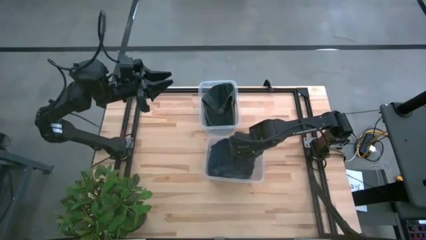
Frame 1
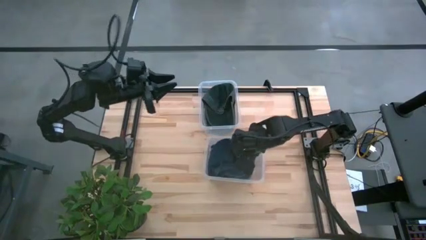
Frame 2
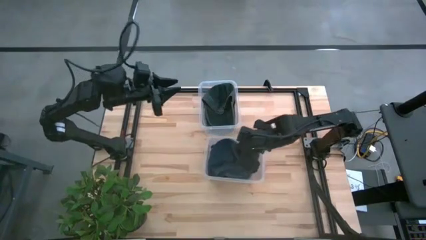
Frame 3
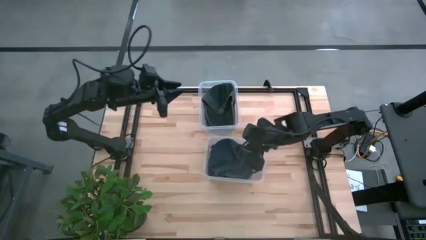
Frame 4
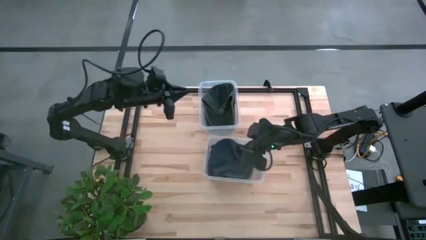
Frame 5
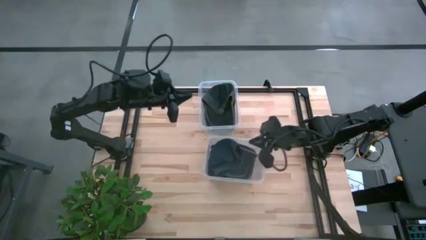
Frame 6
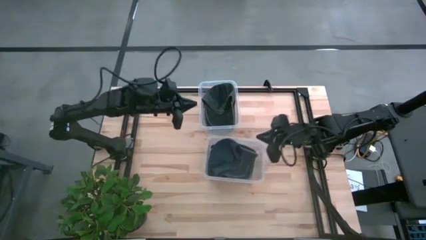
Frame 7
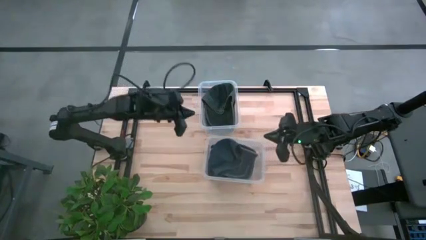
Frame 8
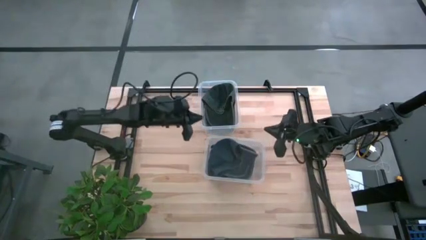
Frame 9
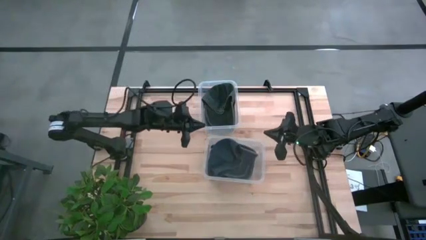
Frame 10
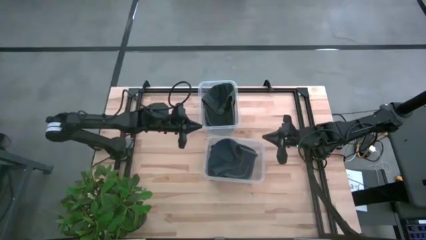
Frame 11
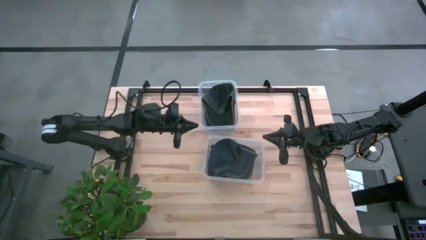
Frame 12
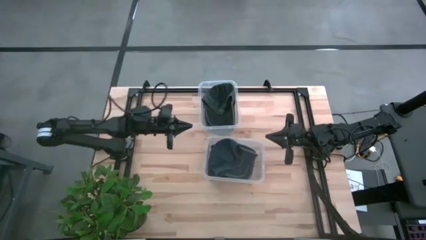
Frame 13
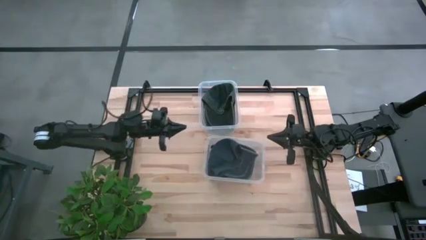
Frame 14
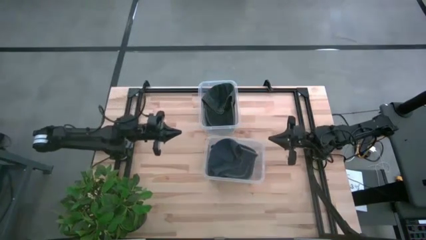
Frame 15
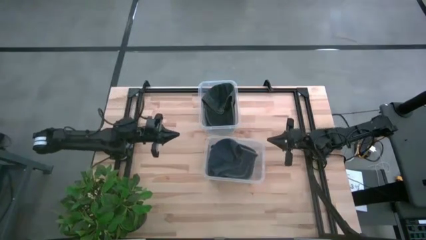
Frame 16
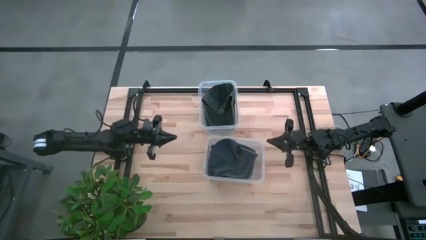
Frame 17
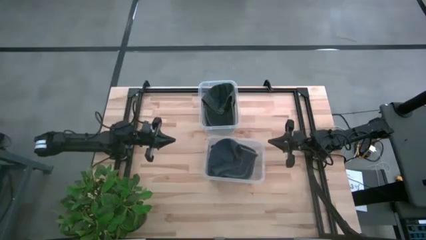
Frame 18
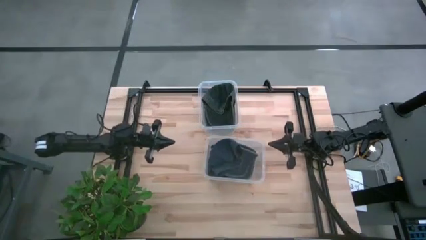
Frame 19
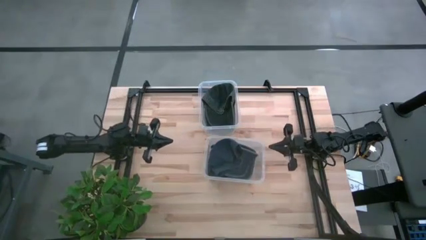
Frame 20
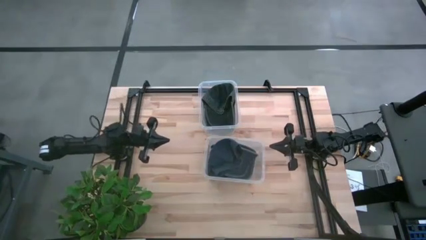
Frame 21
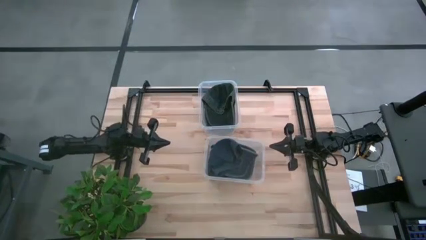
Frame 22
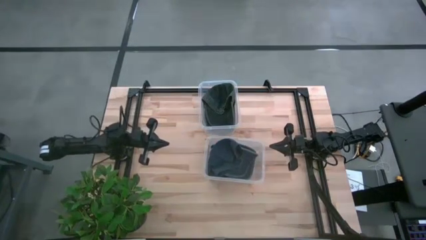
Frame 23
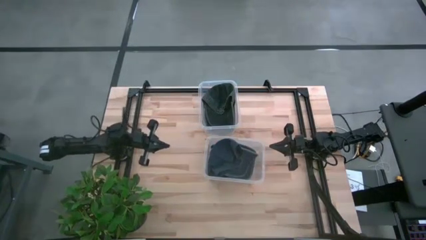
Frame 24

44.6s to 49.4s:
Task: Pick & Place hat
Return to Home Position

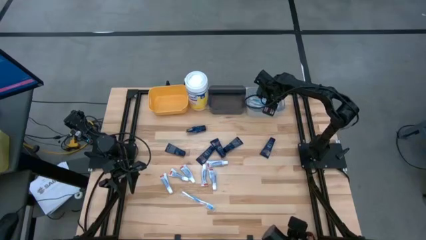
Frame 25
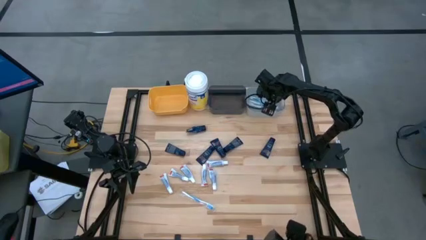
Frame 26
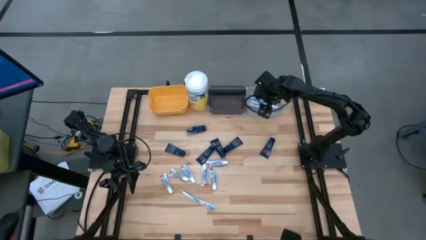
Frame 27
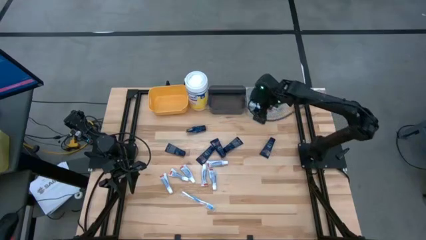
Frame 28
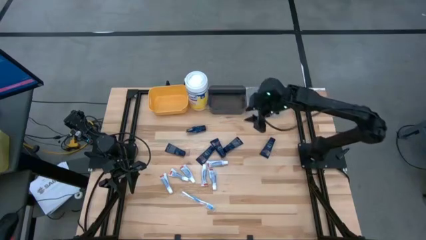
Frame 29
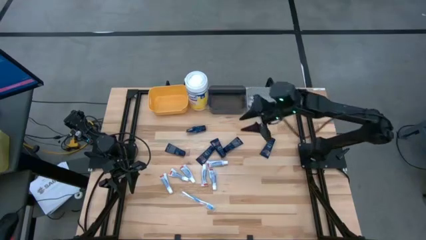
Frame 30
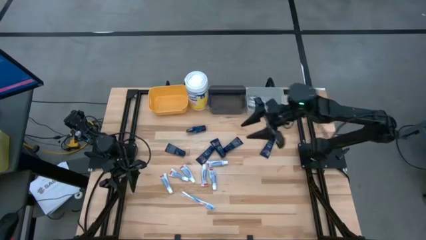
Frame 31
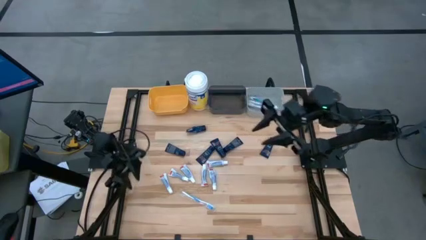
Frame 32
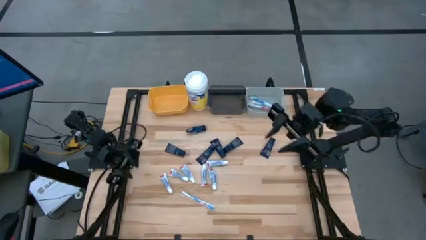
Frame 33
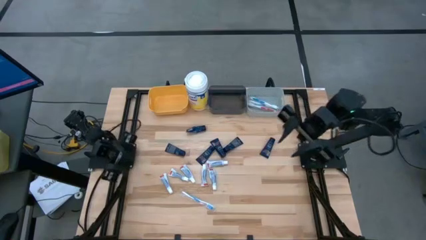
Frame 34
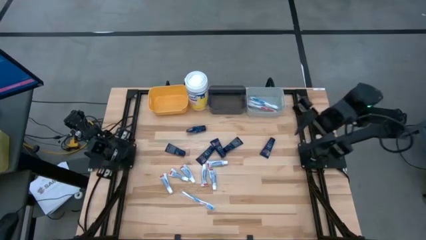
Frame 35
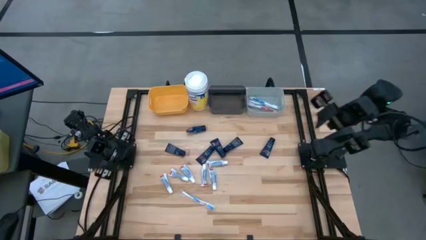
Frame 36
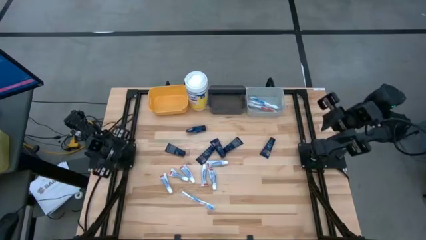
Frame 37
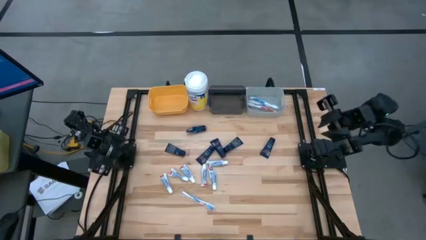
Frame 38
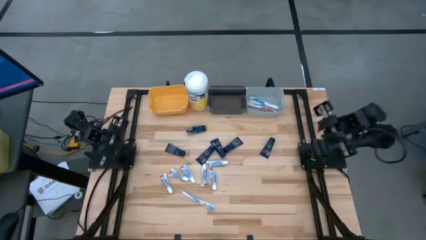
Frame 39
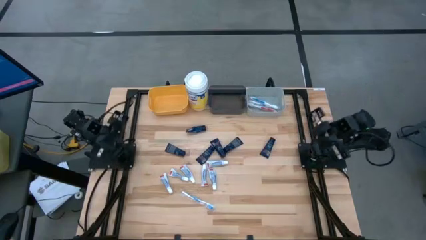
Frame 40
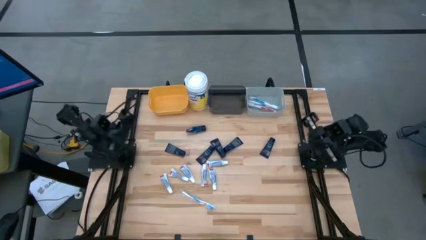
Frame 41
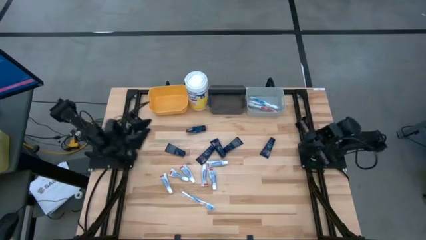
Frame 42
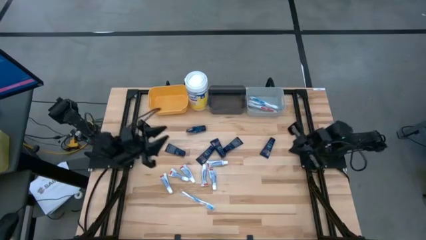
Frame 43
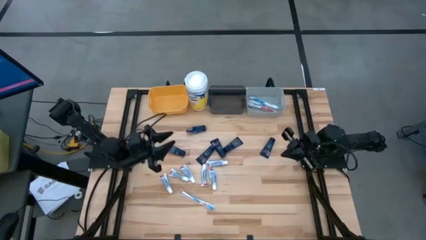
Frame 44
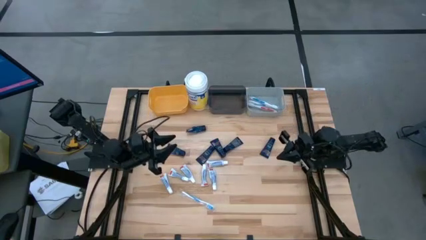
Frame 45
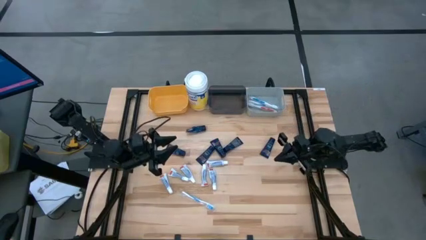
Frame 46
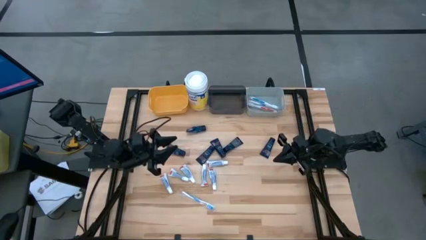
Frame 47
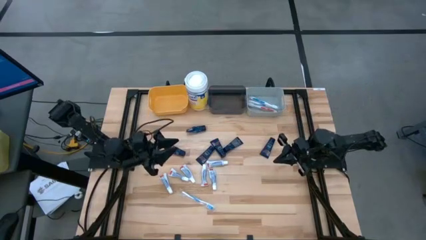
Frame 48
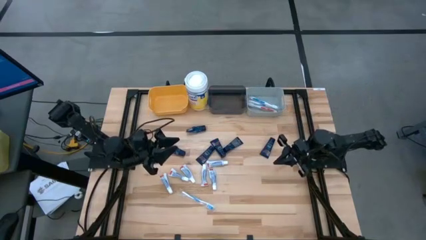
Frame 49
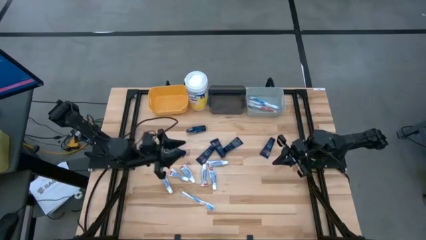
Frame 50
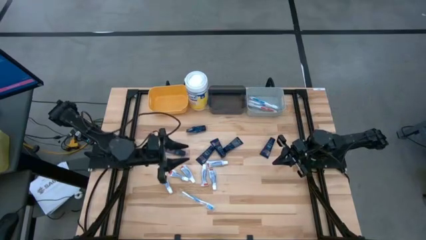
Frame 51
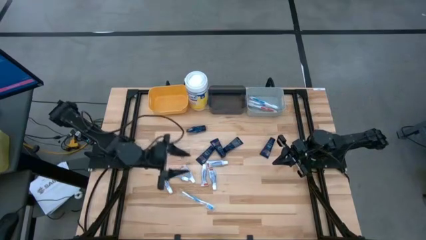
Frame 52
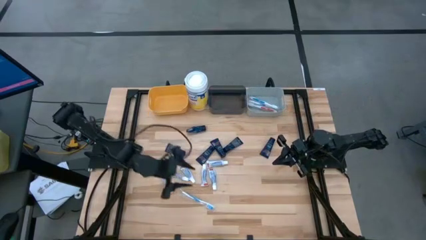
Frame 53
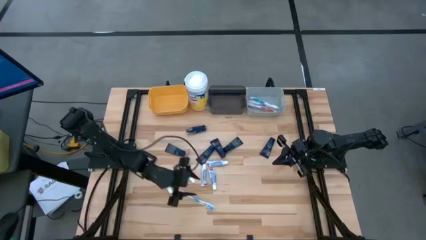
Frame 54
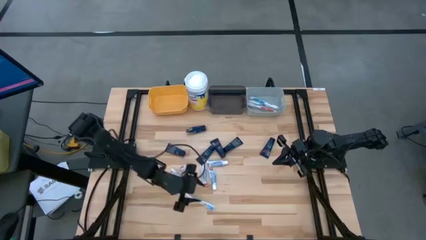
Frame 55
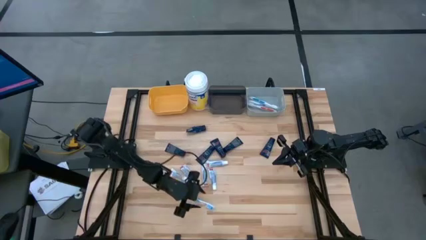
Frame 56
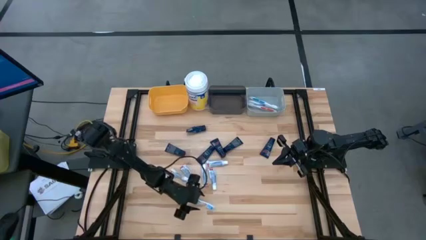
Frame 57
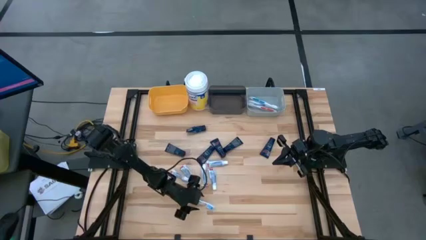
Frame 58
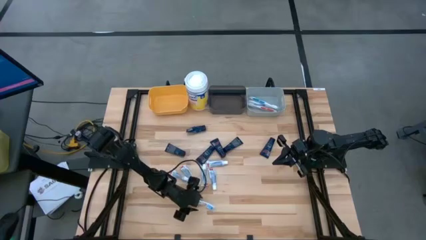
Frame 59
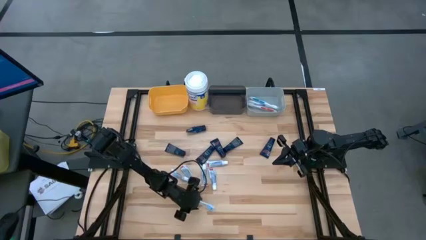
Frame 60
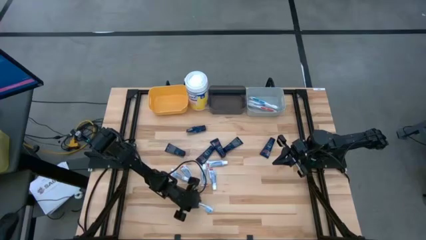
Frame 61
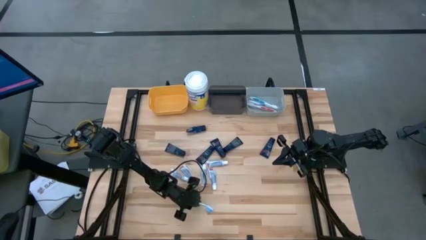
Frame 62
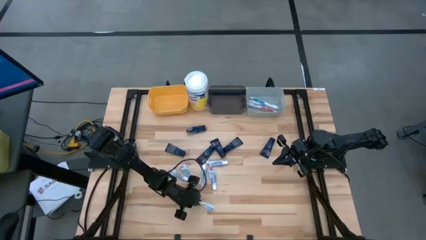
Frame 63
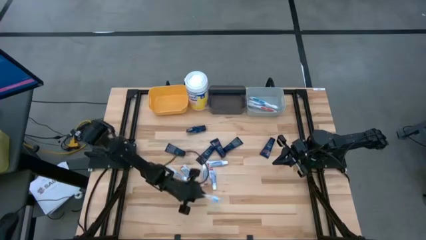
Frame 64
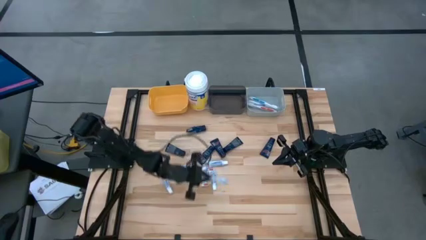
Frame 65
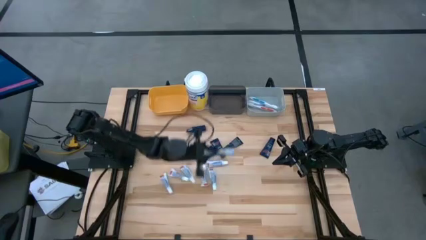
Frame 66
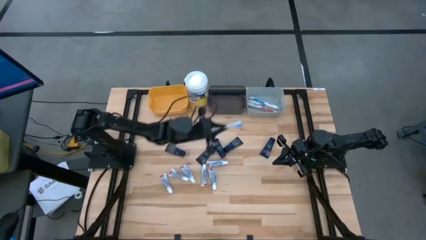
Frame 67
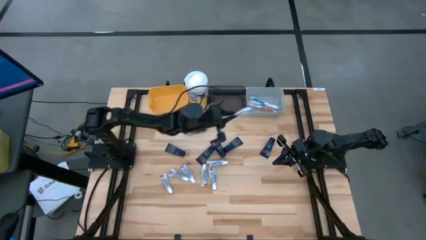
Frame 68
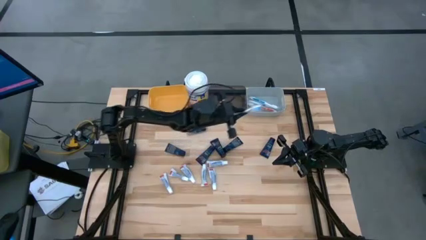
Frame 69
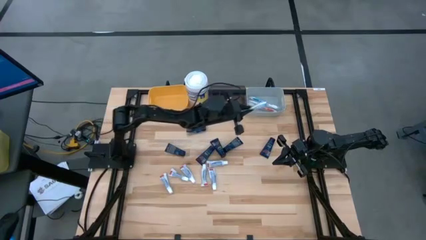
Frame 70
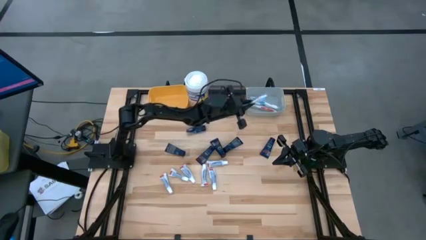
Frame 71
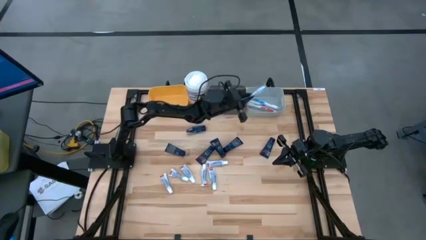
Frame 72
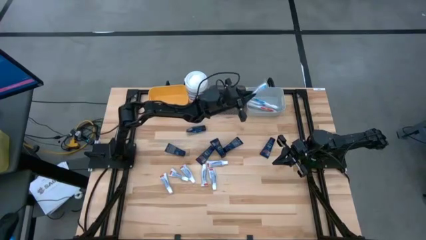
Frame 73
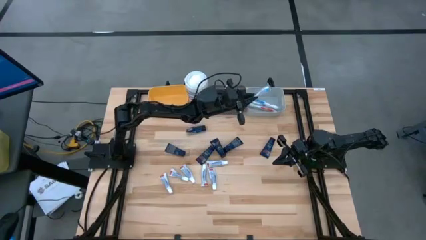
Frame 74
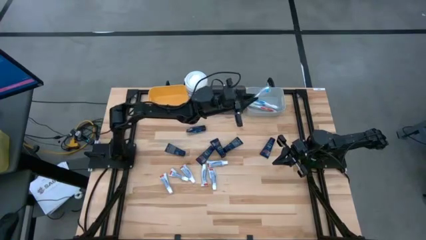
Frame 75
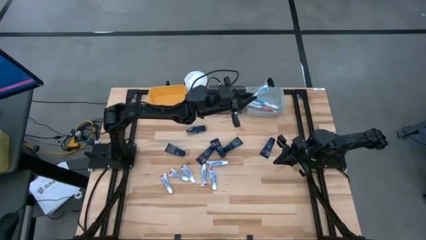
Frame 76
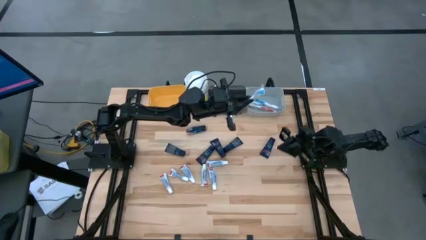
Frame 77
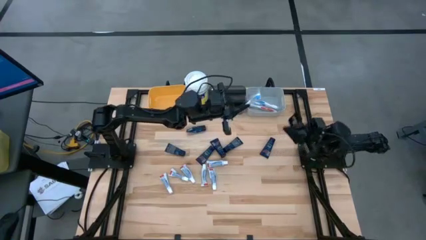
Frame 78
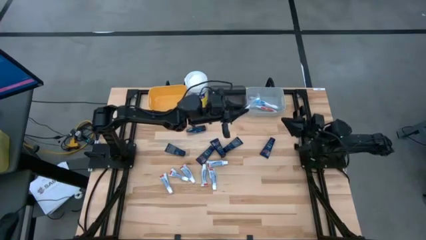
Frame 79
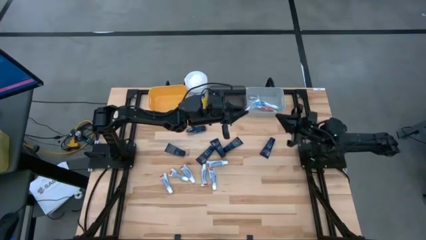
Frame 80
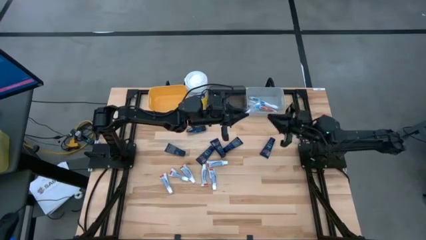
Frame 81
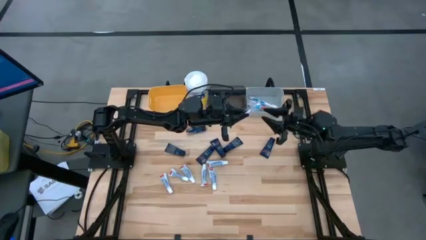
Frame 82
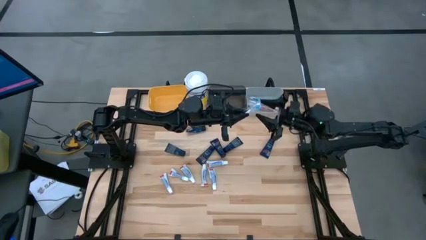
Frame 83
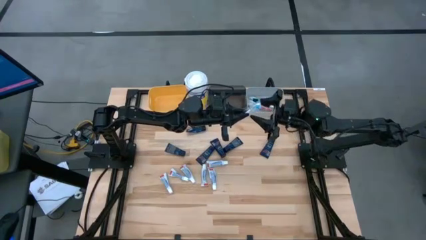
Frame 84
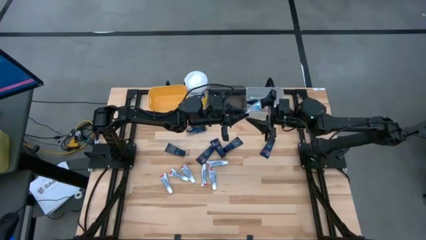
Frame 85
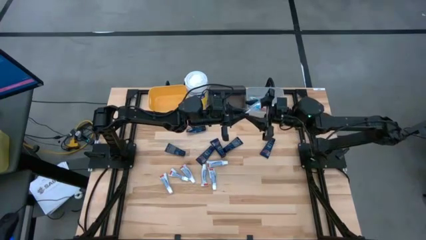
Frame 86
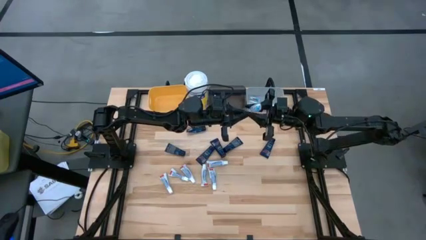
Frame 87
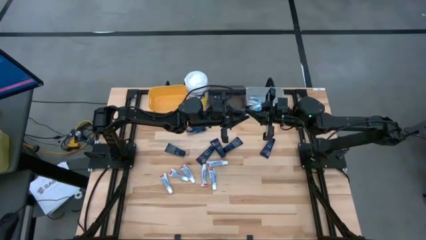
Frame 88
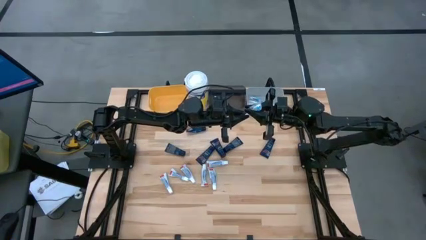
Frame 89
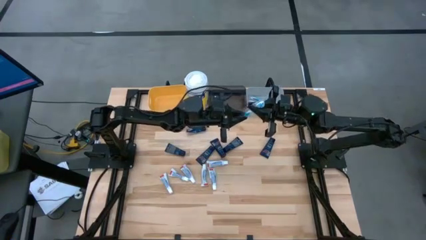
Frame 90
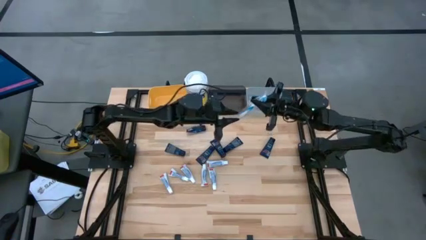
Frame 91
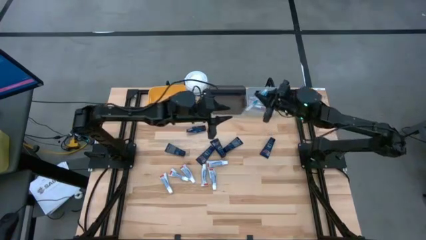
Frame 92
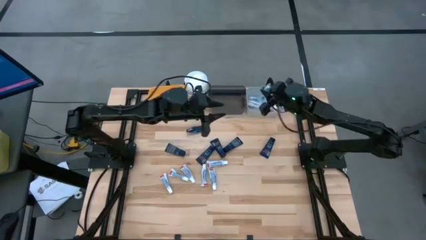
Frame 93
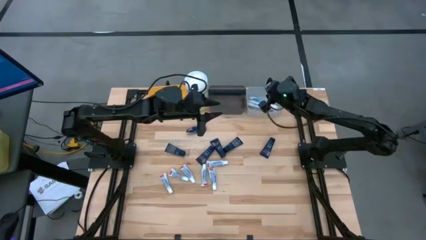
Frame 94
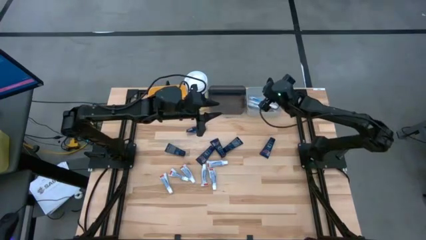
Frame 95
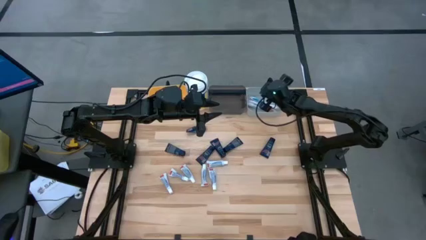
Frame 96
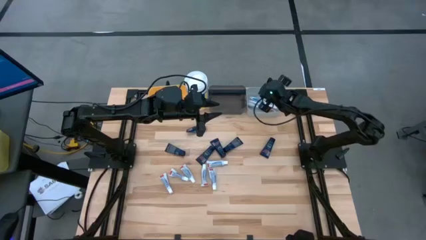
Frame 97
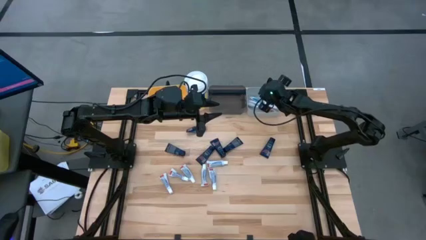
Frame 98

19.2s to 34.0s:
Task: Pick & Place Travel size toiletries
Put the light blue toothbrush into the gray bin
